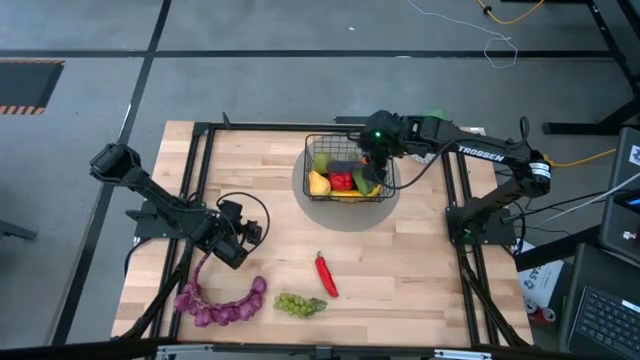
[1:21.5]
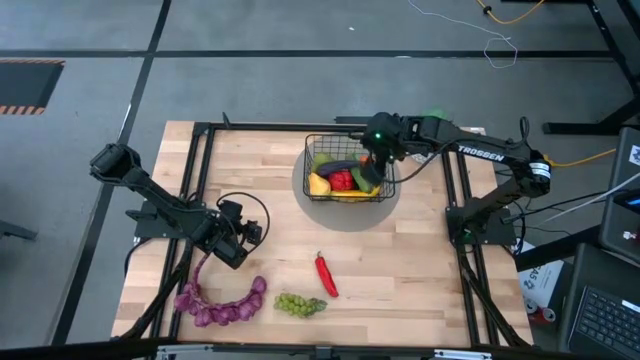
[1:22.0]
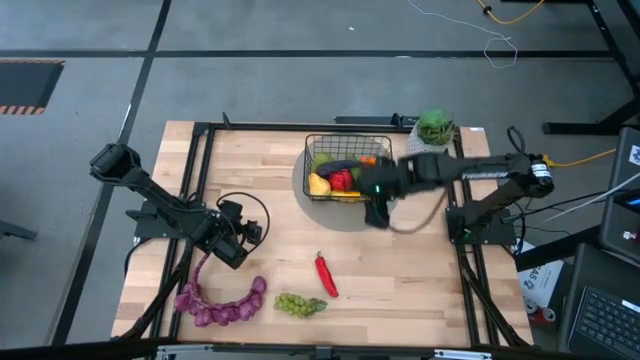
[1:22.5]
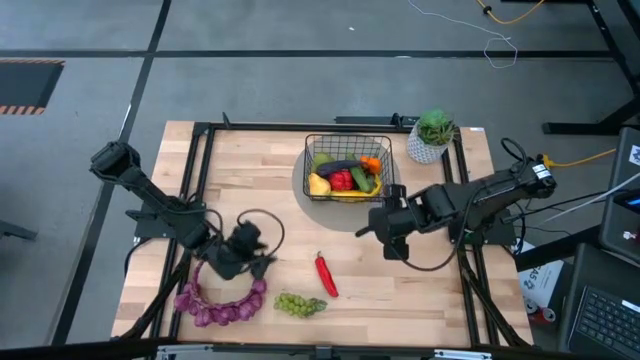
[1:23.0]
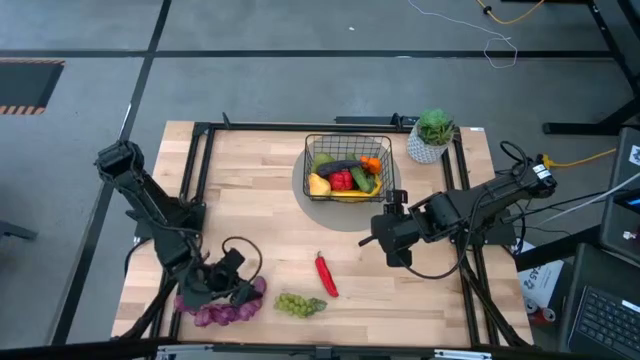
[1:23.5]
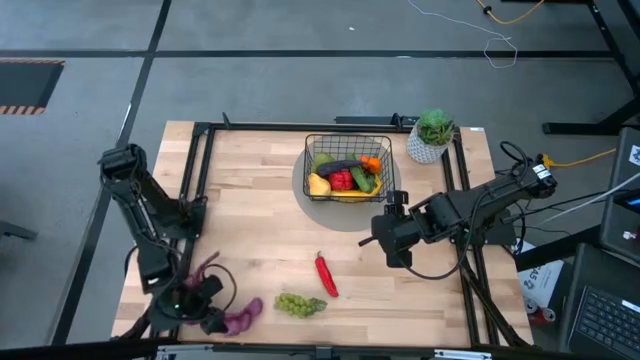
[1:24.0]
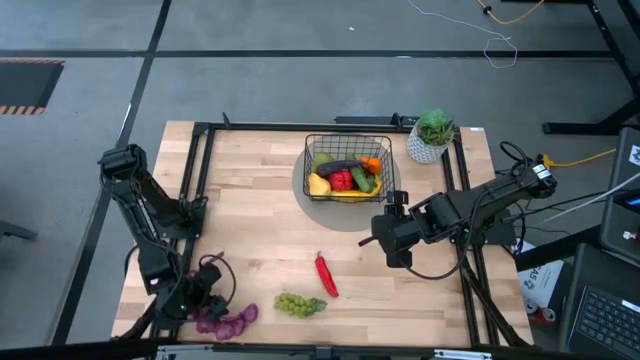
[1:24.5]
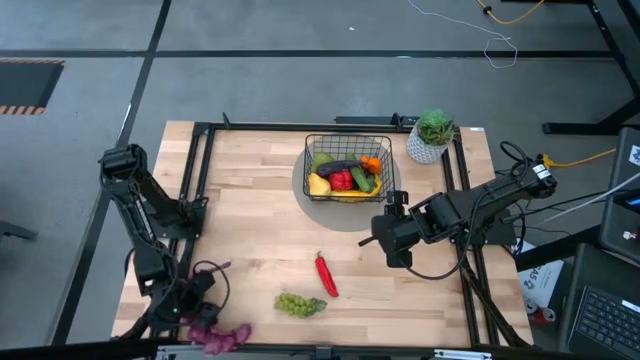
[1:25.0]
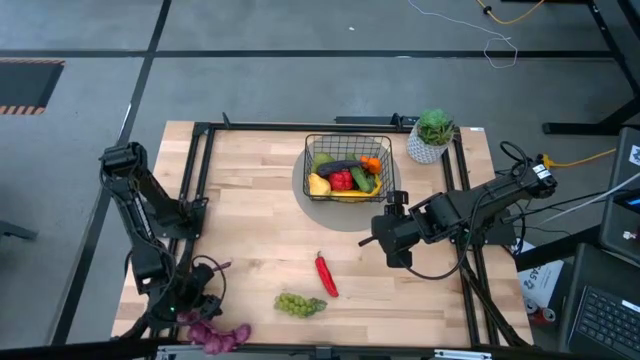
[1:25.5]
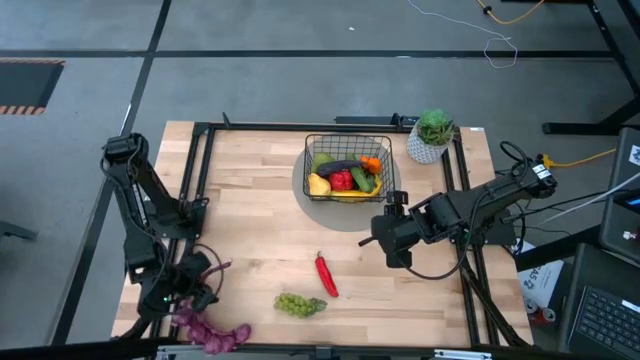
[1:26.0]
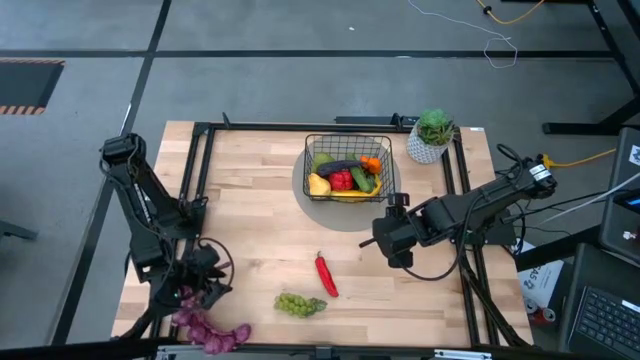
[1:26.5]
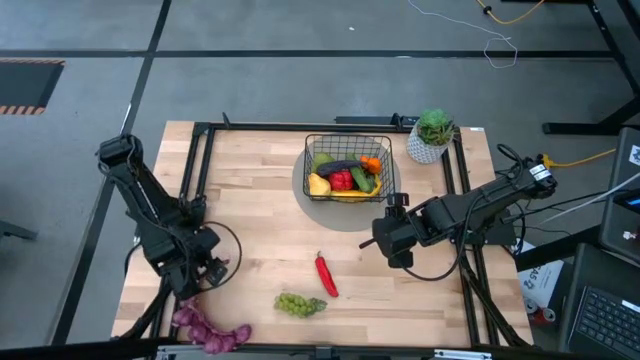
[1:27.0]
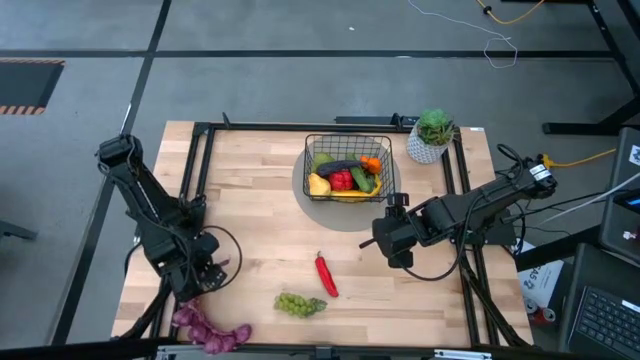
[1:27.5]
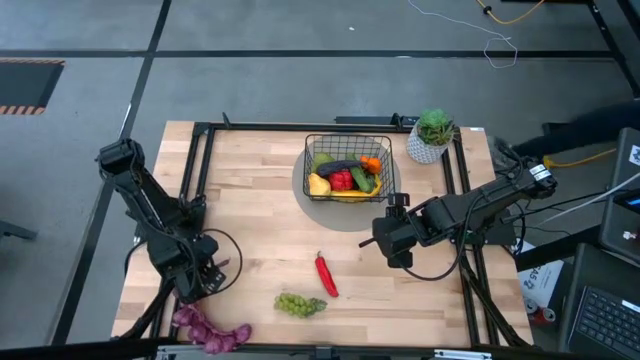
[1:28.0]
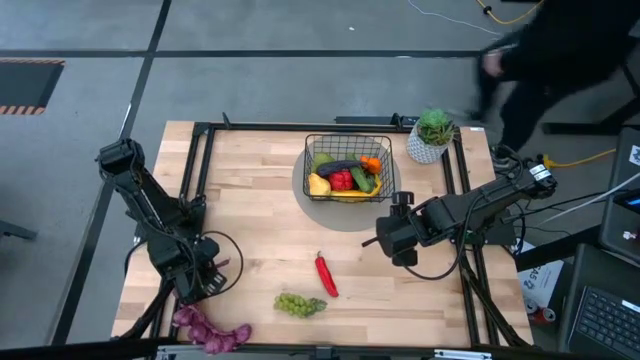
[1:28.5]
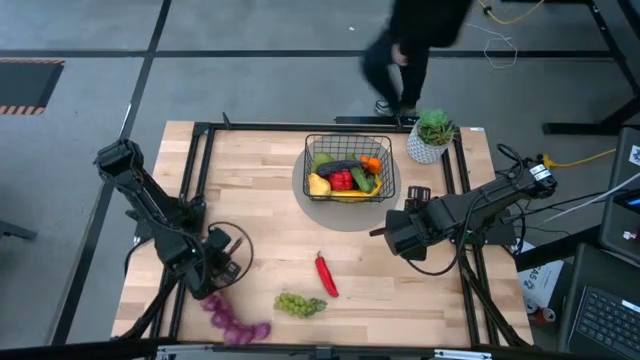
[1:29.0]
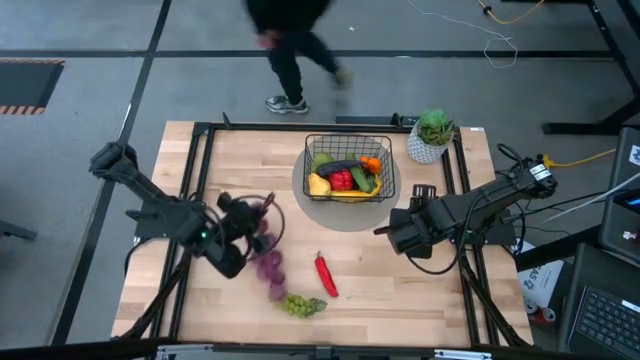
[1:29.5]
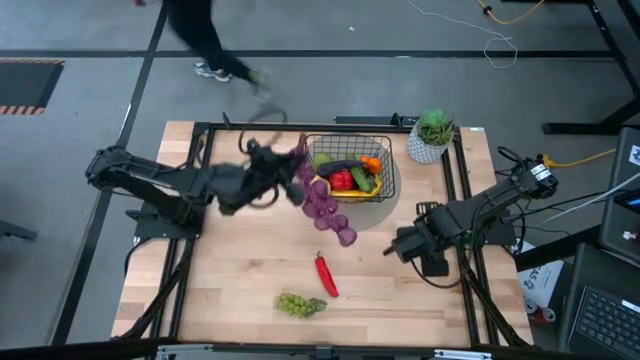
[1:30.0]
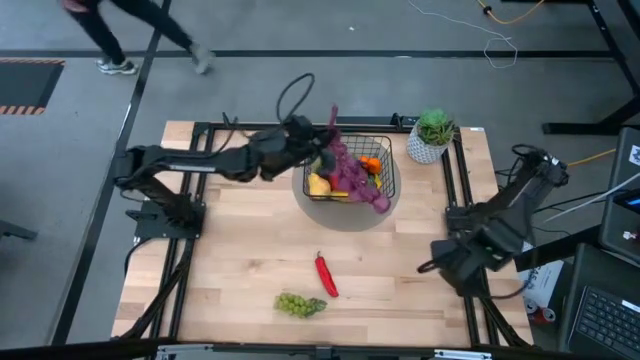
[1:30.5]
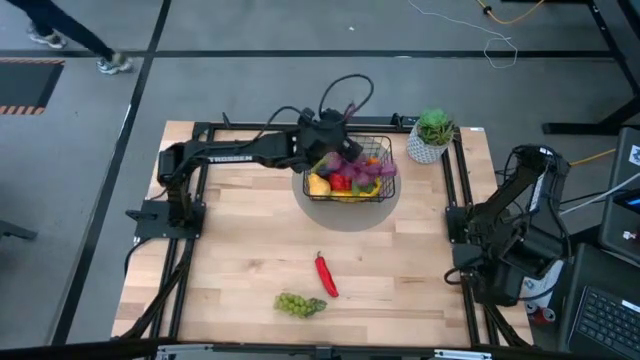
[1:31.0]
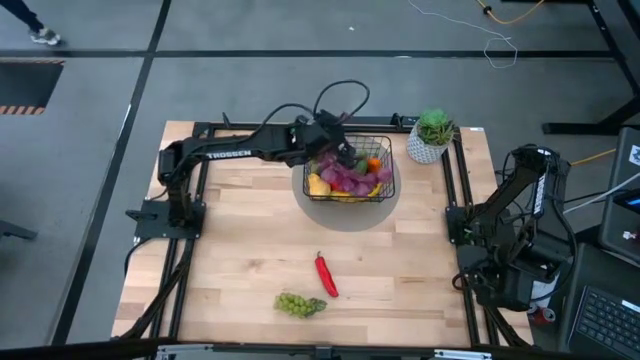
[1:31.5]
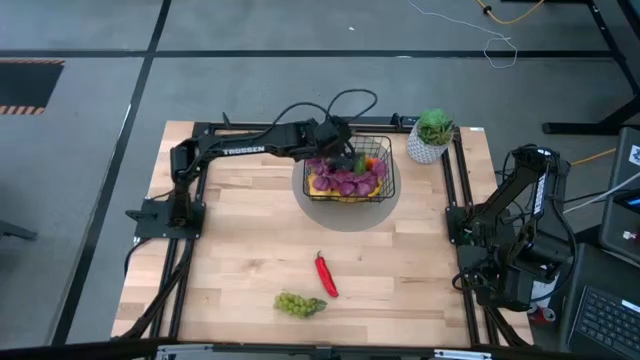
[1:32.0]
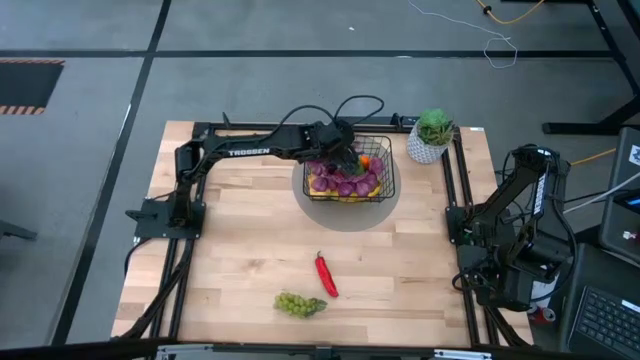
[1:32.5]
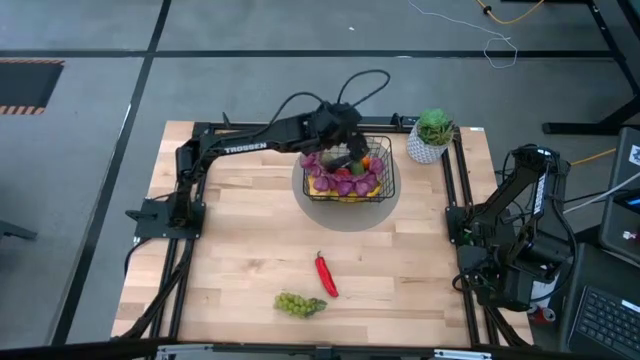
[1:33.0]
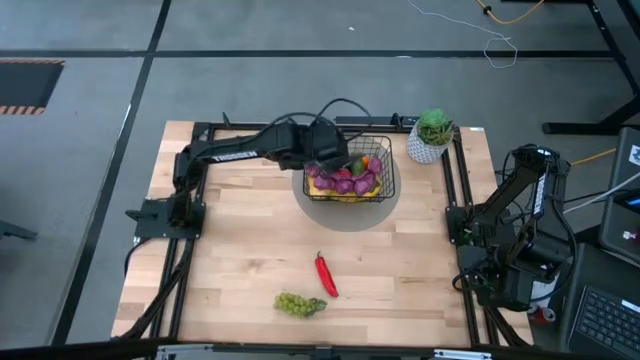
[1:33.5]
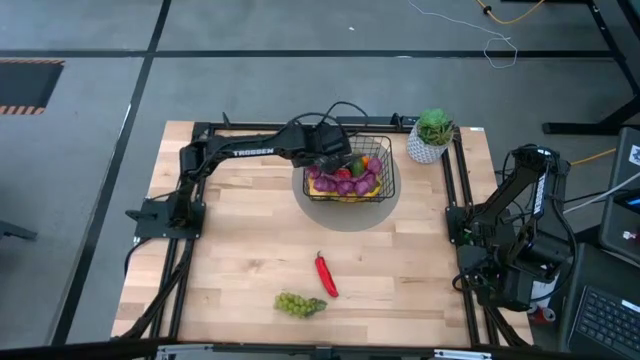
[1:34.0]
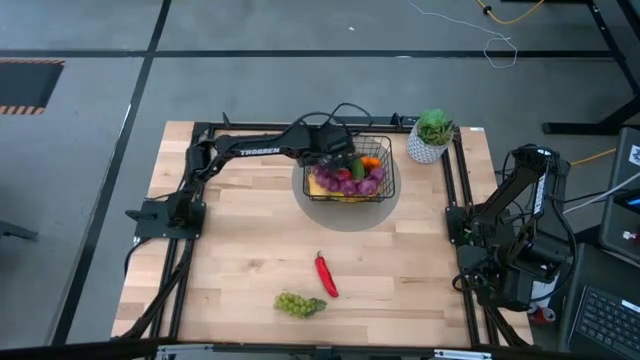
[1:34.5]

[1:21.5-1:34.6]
Task: Build produce basket
Put the violet garlic into the black wire basket

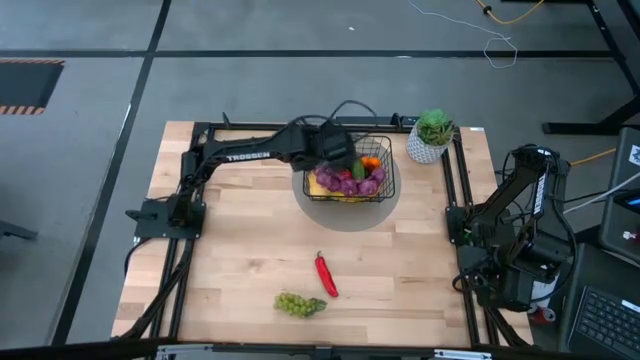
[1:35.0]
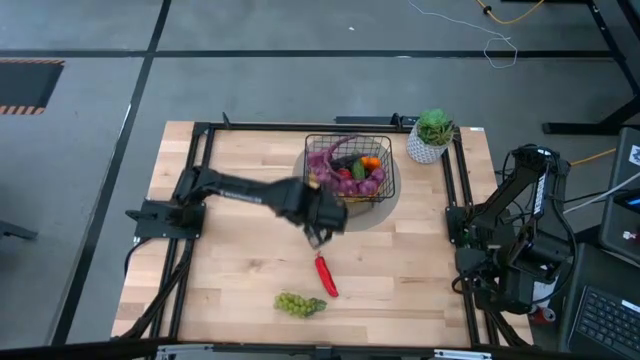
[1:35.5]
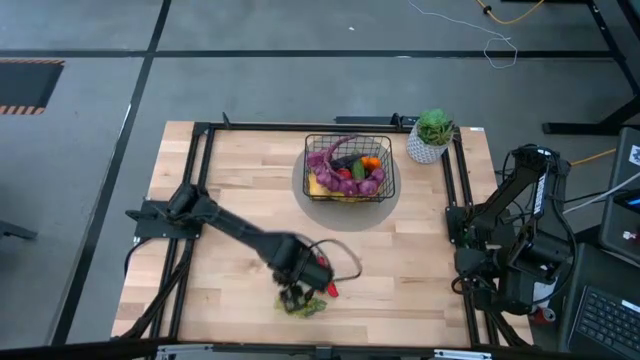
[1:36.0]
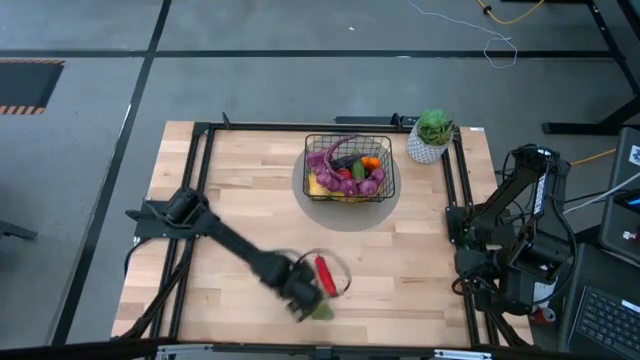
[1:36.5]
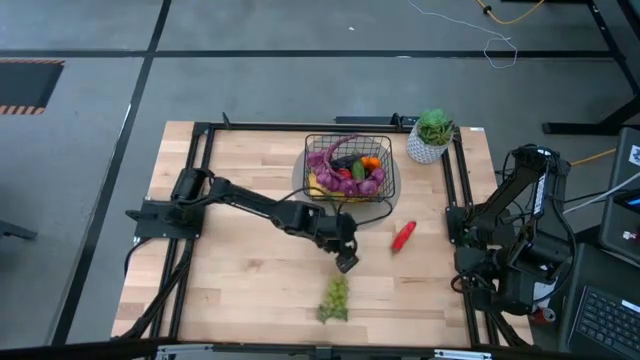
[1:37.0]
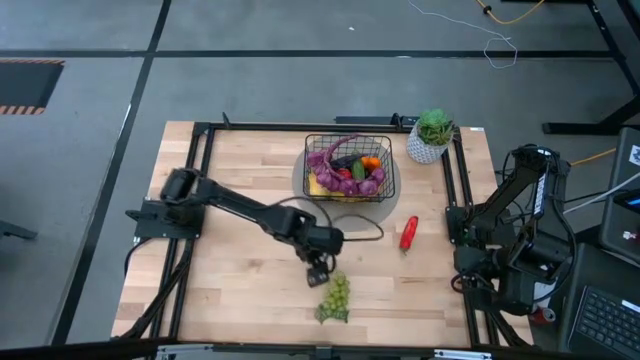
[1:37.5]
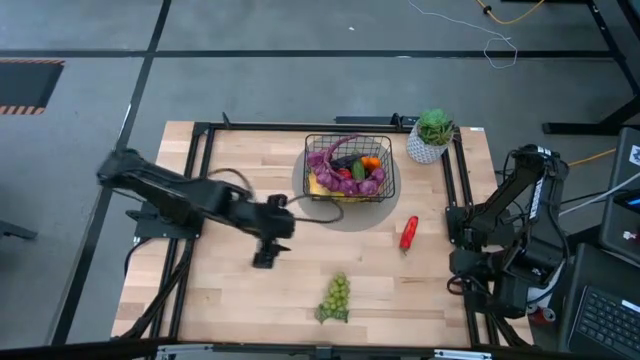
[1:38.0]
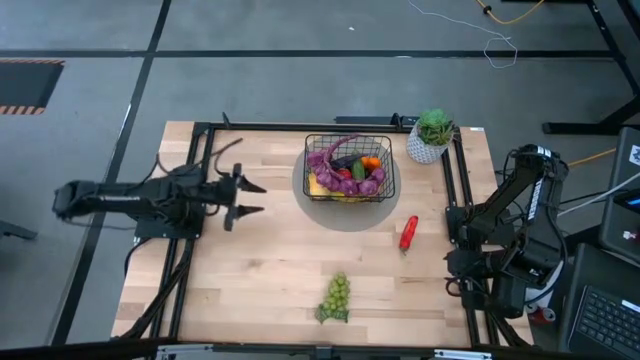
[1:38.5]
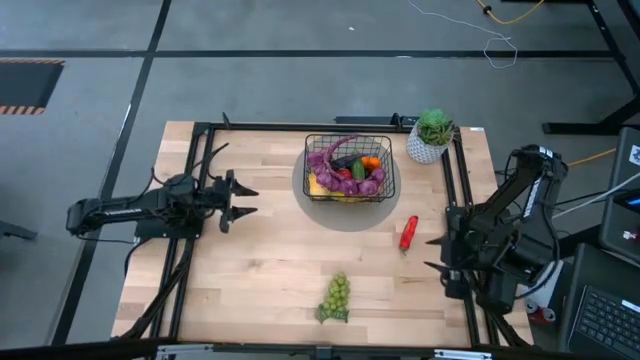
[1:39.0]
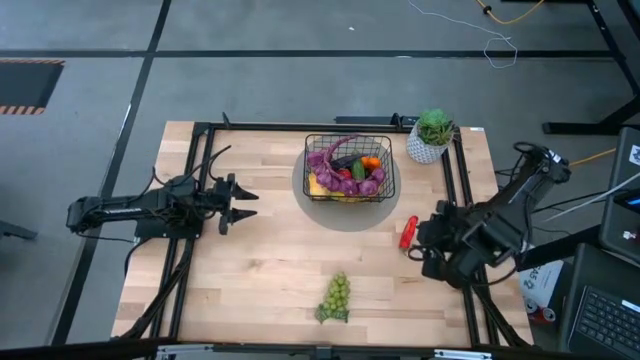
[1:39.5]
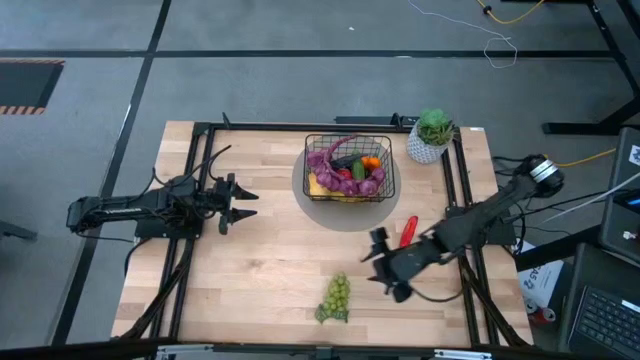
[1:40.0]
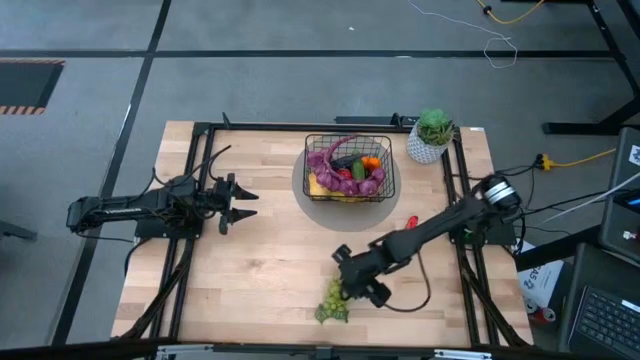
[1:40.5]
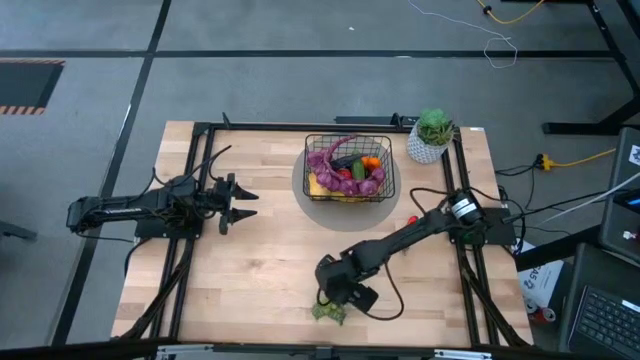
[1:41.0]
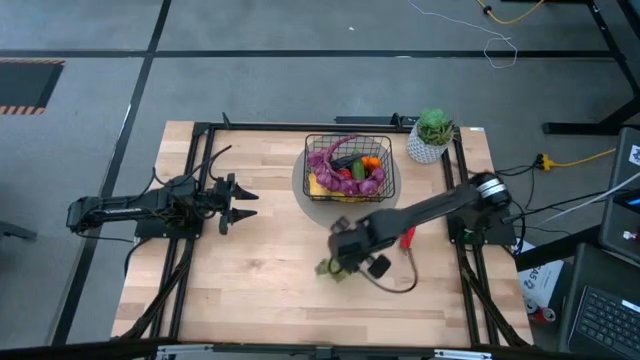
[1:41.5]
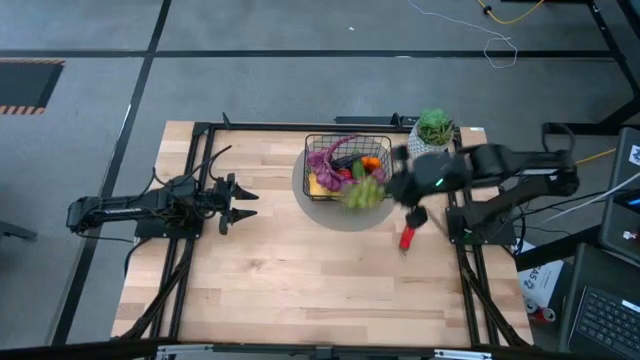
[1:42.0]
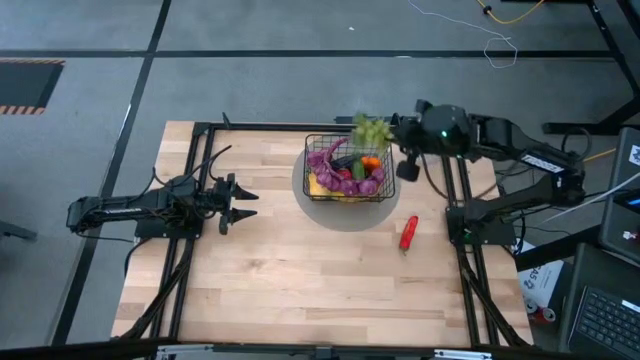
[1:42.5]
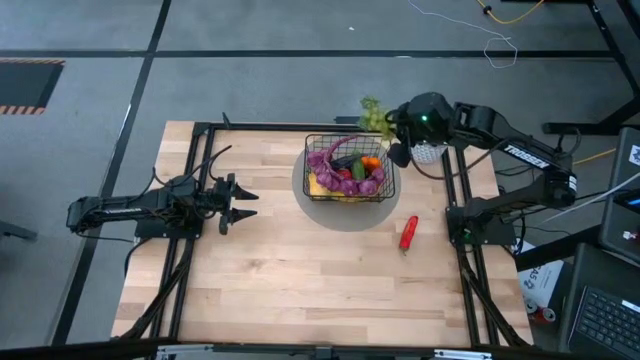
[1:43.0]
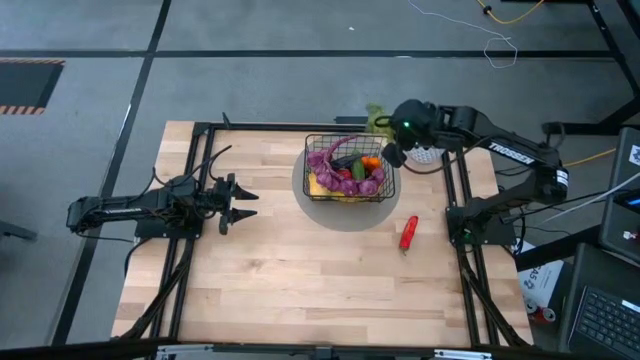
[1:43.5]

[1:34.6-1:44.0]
Put the green grapes into the black wire basket
